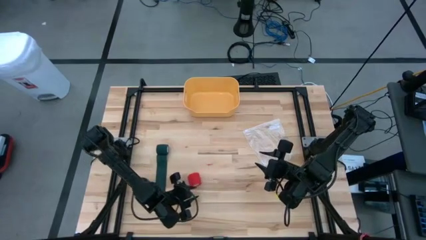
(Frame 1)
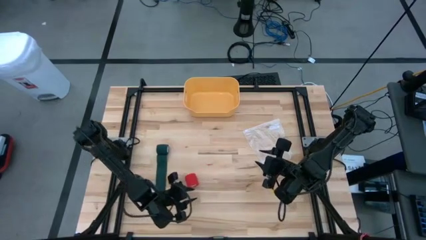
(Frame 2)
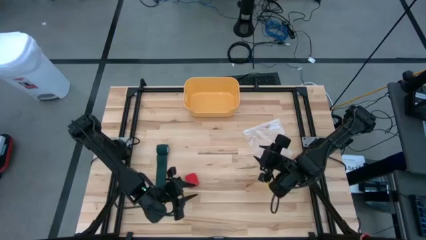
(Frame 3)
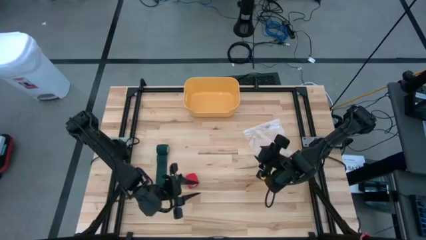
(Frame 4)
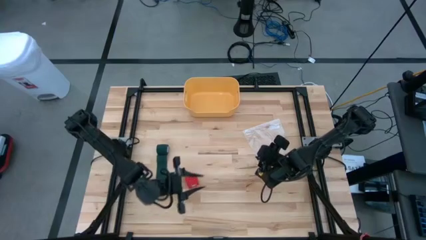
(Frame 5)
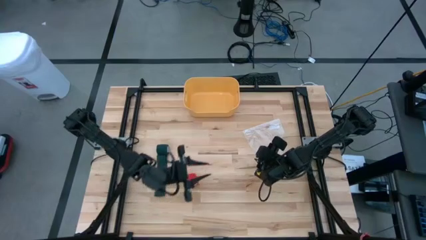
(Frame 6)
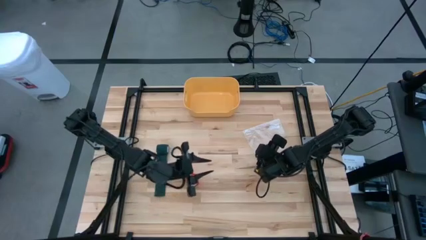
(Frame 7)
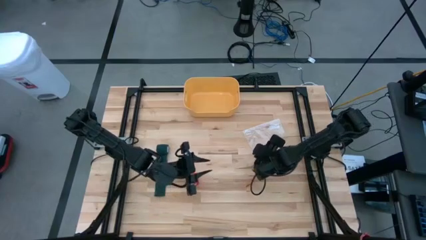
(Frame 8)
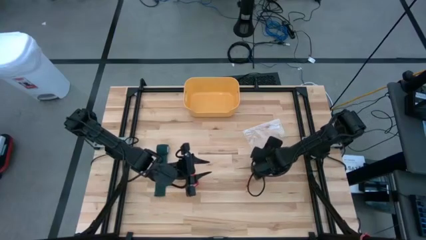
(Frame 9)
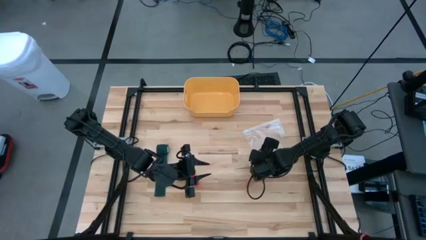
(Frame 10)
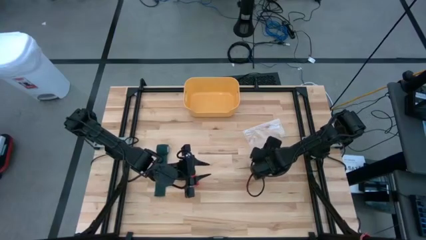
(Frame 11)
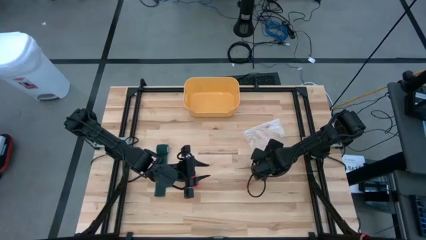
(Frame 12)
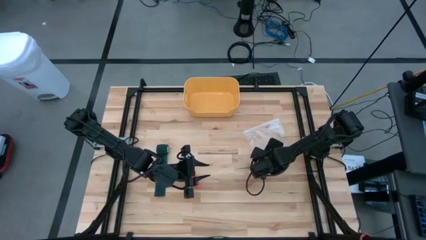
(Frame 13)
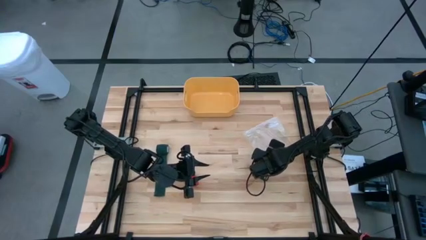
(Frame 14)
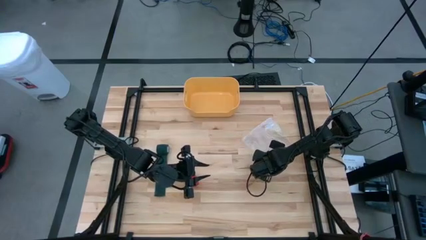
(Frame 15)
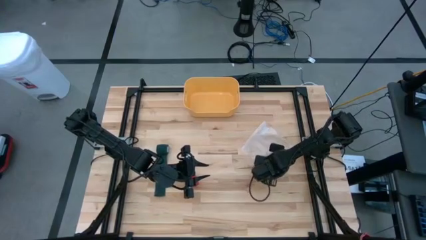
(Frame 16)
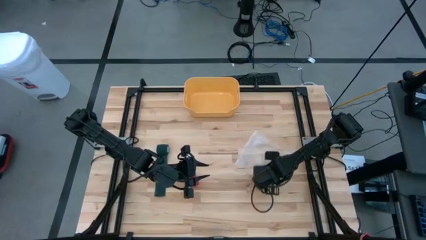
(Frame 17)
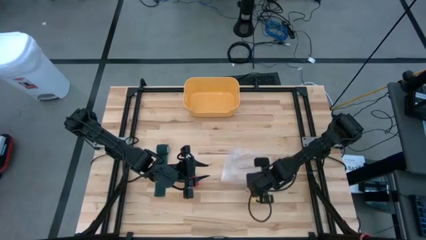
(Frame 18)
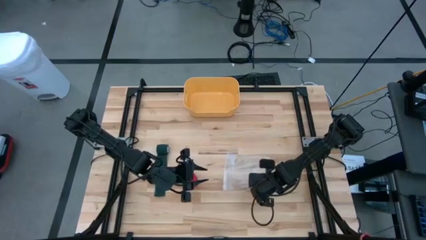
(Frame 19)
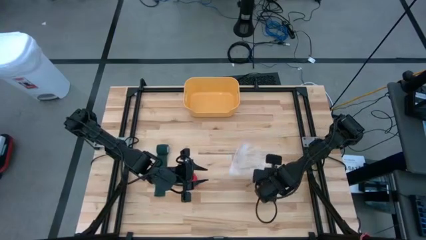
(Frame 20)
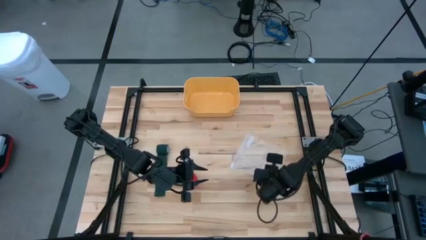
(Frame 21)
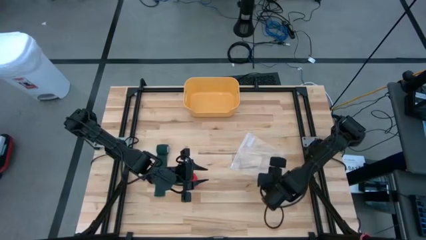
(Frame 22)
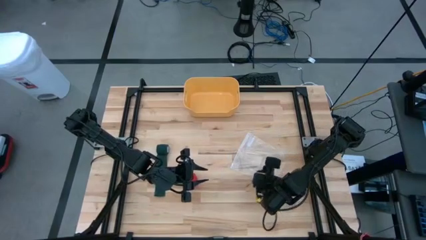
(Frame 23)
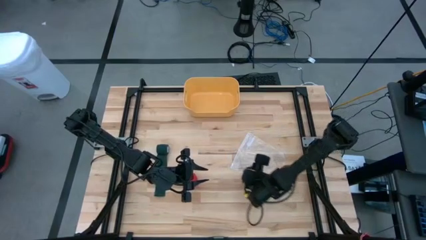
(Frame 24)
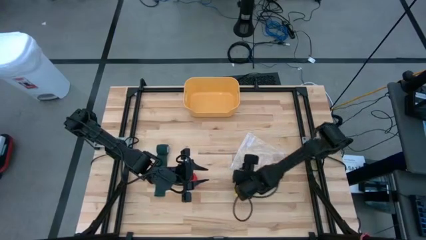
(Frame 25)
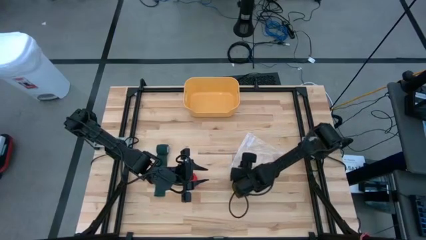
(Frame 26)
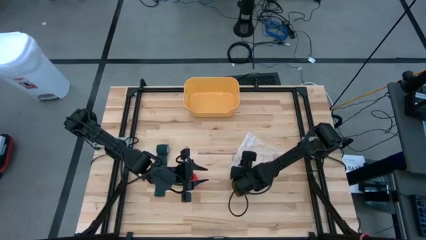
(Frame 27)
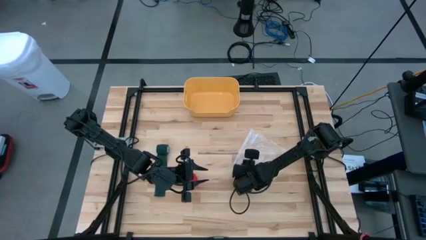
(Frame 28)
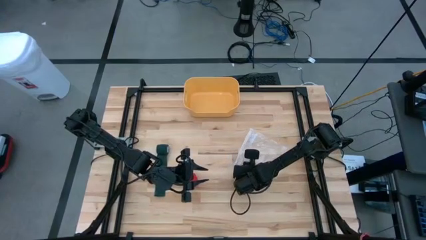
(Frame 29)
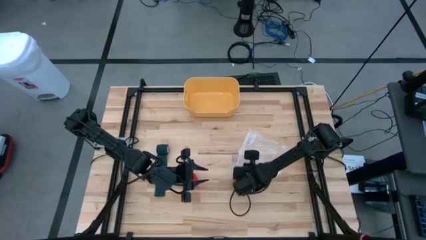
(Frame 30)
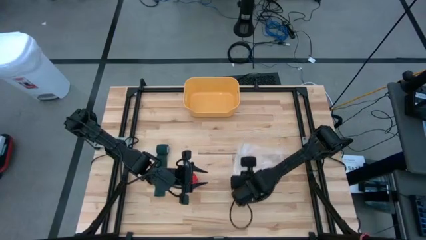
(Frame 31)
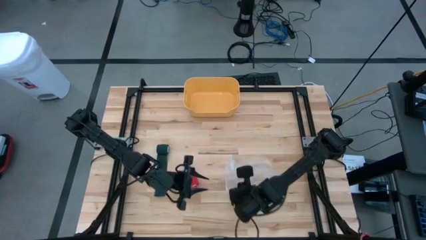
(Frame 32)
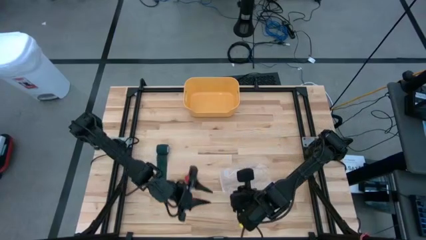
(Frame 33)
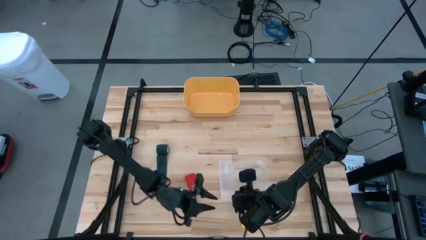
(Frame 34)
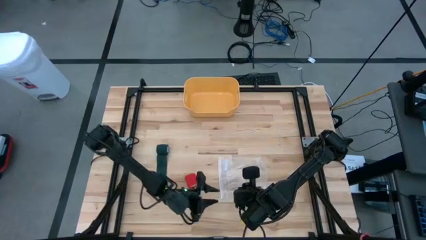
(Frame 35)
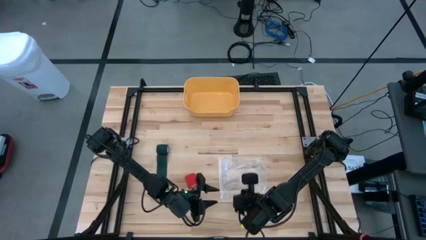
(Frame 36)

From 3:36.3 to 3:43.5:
Task: Roll bandage
Open the transparent zip bag

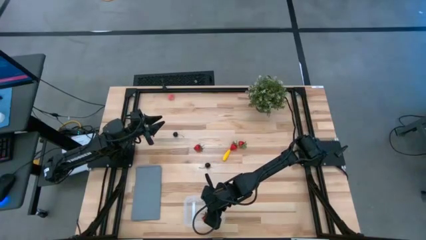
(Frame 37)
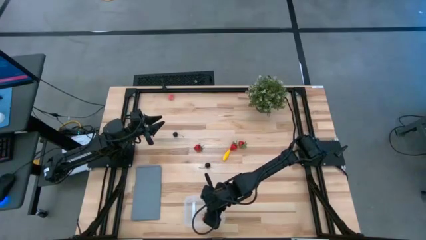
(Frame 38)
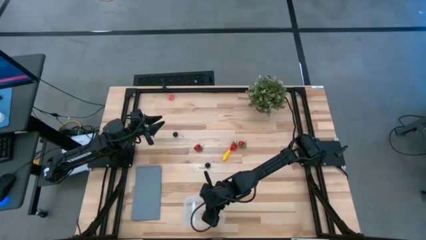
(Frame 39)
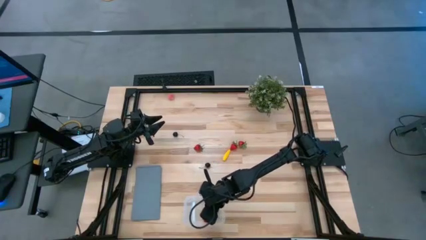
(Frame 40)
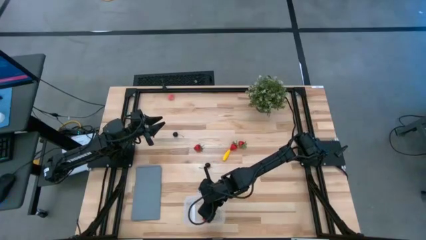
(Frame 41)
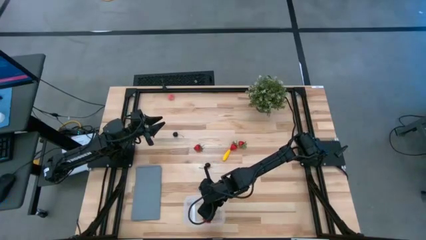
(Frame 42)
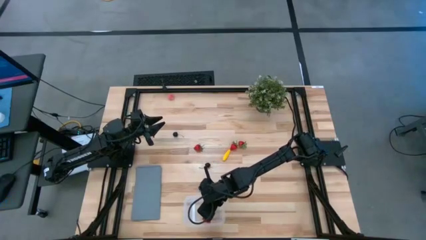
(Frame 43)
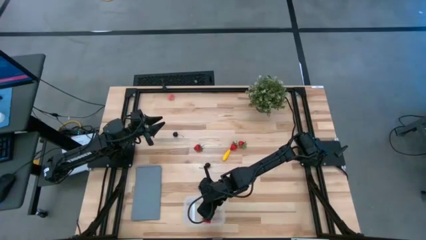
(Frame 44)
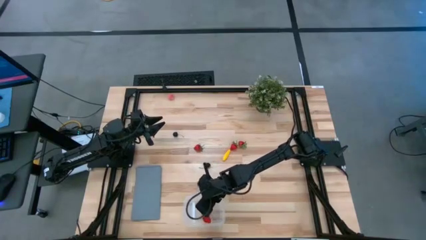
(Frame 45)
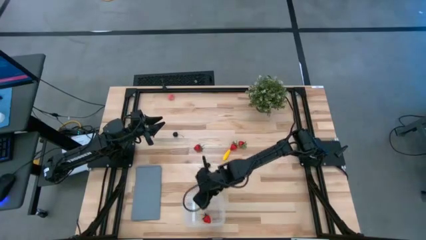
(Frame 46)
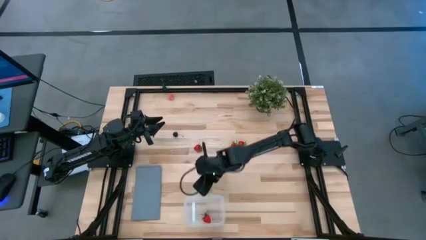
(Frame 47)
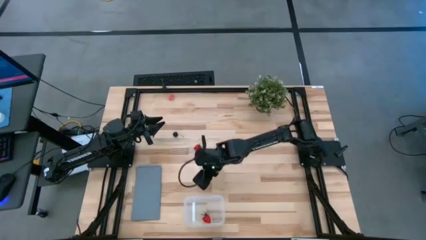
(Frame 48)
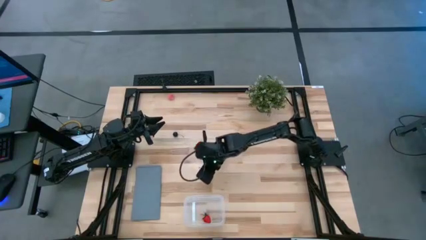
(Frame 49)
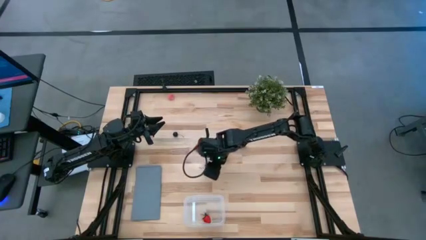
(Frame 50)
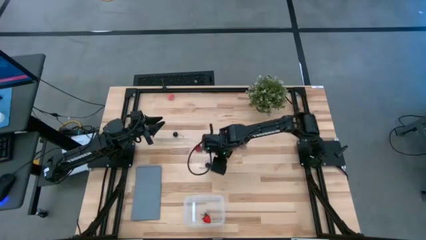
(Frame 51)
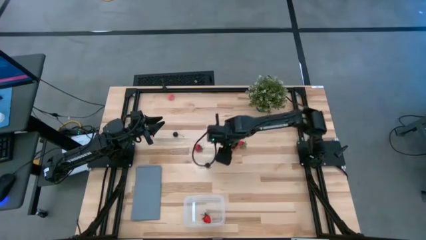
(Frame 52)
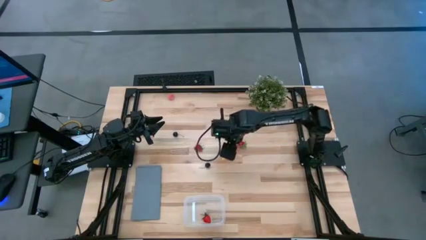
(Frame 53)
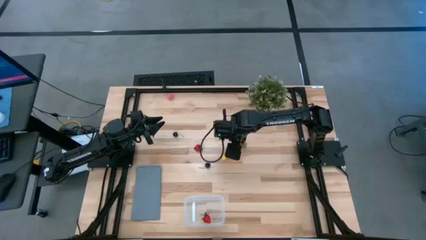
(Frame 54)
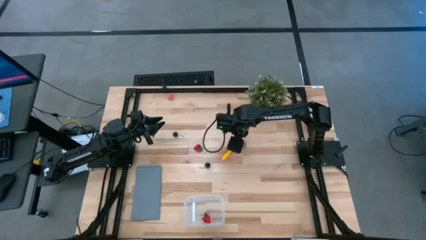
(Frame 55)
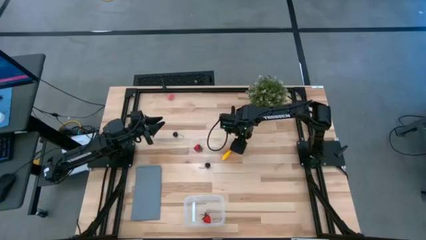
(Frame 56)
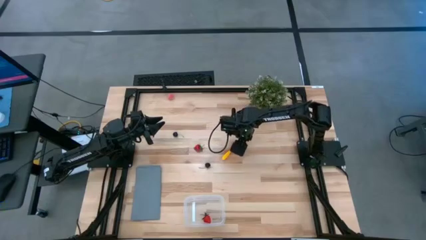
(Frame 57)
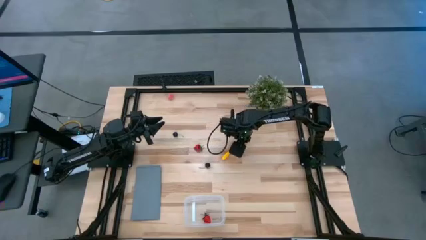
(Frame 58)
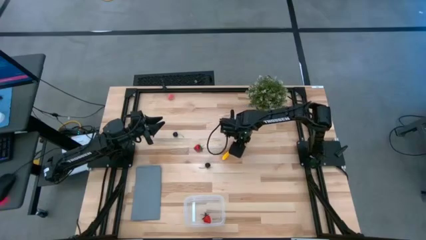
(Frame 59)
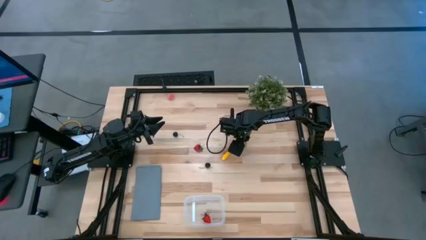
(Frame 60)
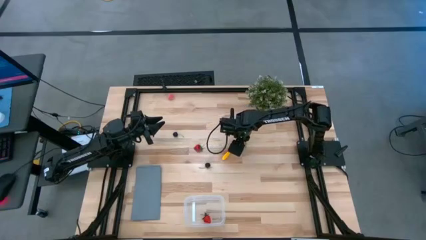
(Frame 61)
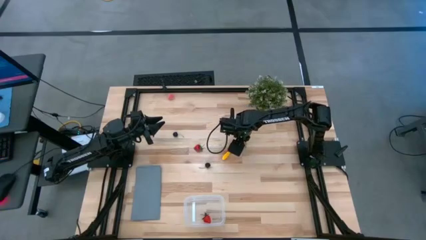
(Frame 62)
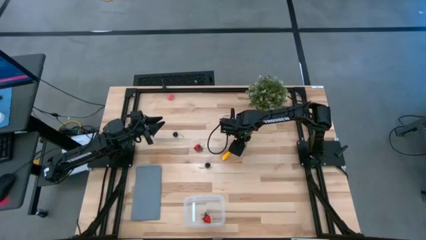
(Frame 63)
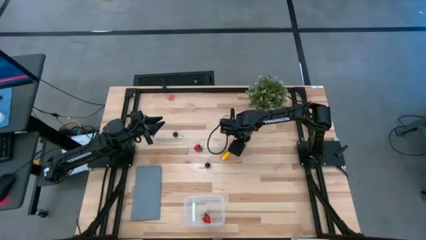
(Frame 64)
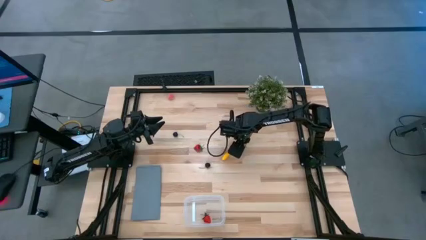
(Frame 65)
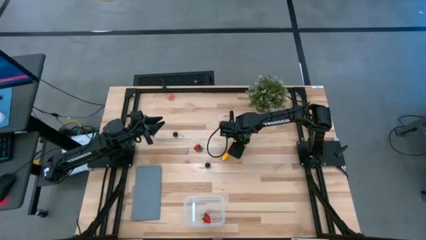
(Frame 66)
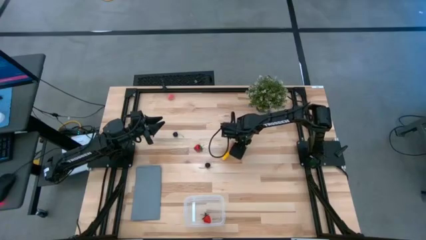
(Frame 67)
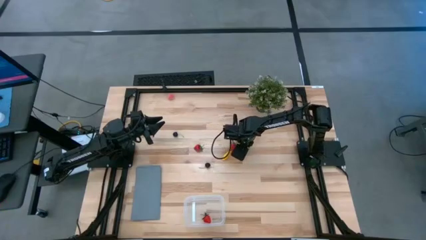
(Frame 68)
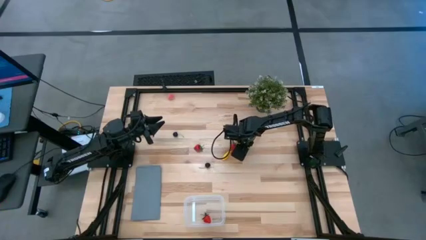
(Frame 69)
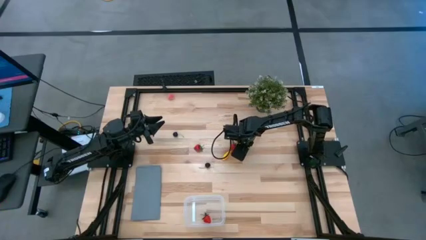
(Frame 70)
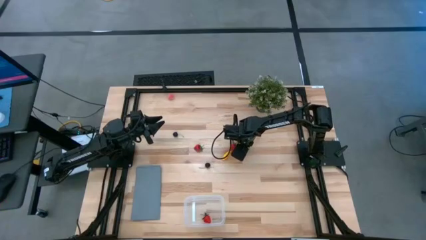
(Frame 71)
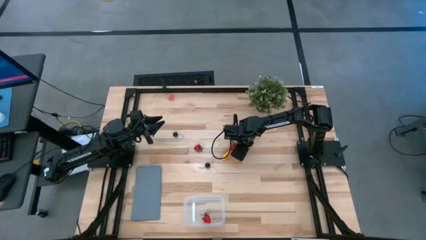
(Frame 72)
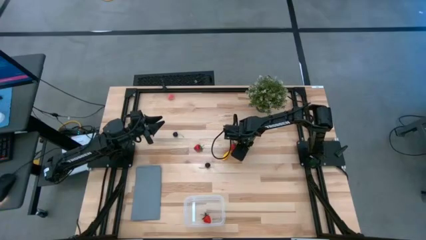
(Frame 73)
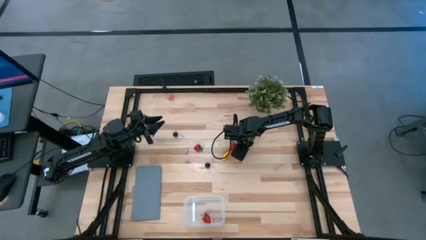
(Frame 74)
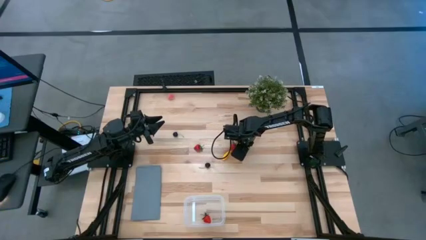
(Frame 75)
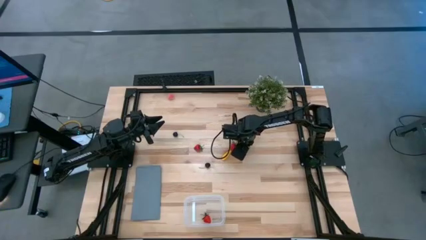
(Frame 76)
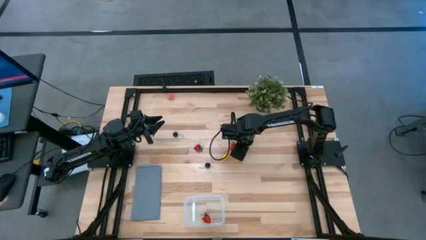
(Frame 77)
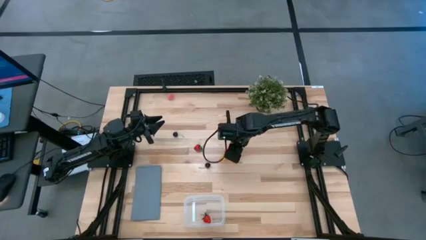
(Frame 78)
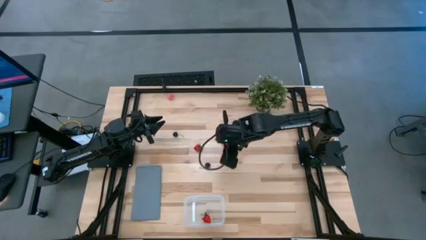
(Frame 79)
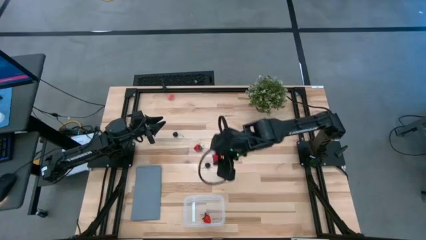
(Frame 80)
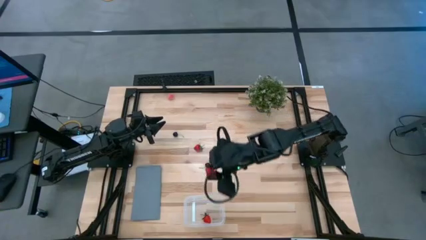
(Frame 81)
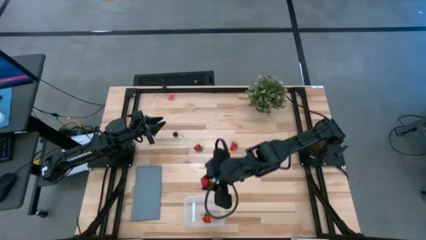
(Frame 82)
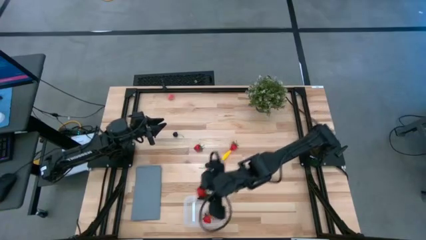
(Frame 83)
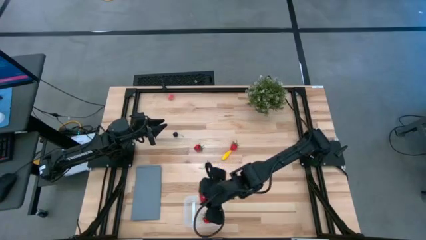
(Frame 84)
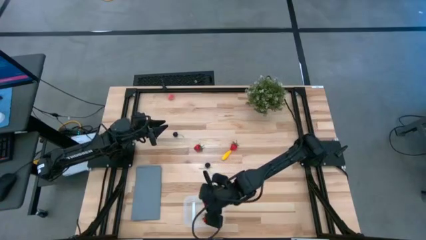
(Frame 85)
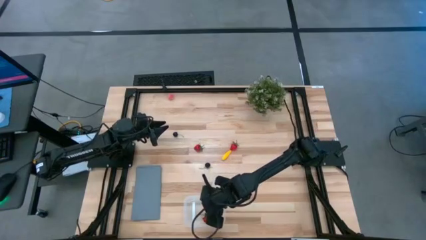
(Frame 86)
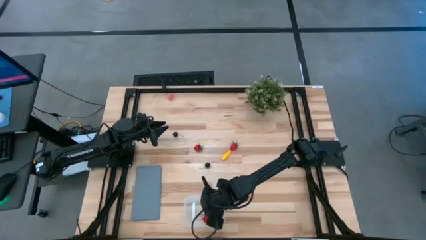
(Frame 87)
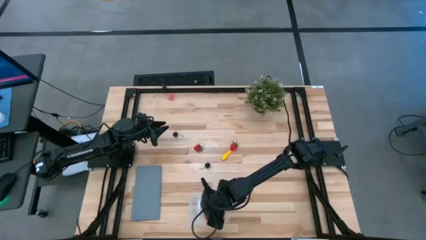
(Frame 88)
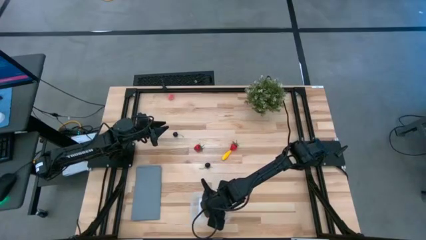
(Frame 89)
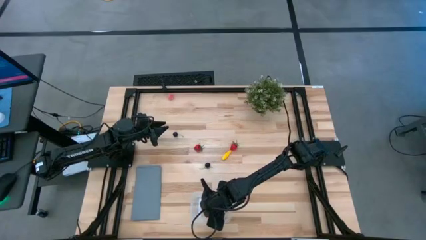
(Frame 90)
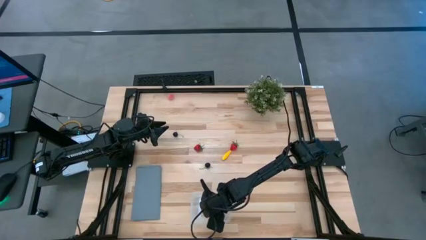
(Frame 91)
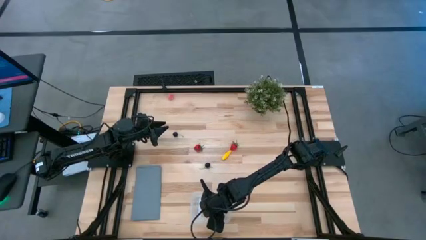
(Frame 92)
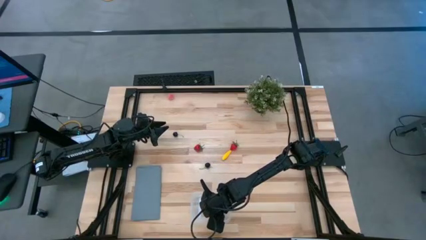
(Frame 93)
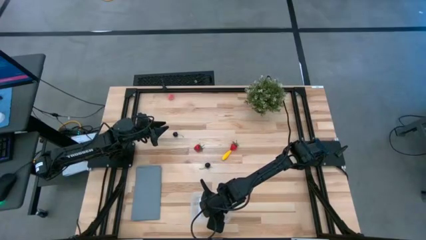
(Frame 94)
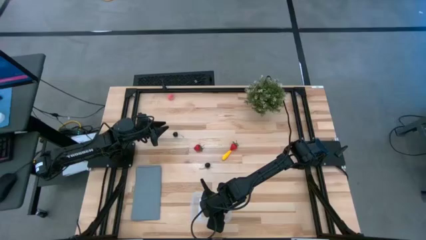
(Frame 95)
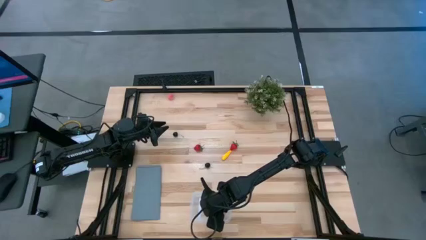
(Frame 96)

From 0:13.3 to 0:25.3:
Task: Pick and placing Produce into tupperware
Put the red strawberry into the transparent bin
